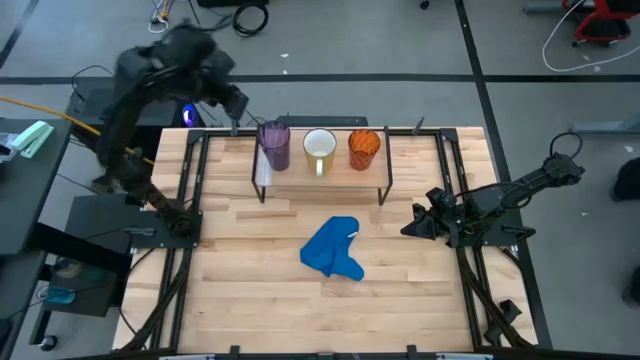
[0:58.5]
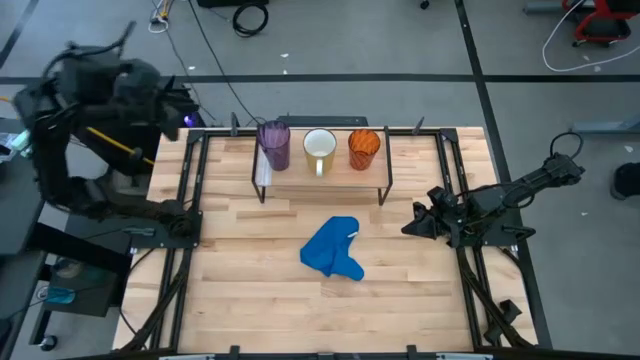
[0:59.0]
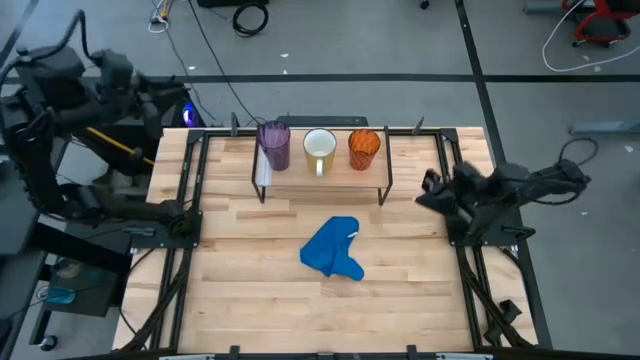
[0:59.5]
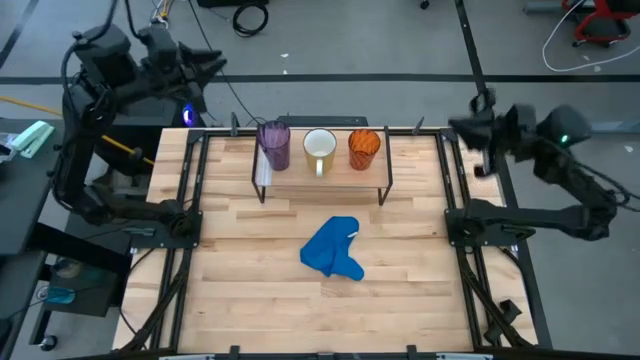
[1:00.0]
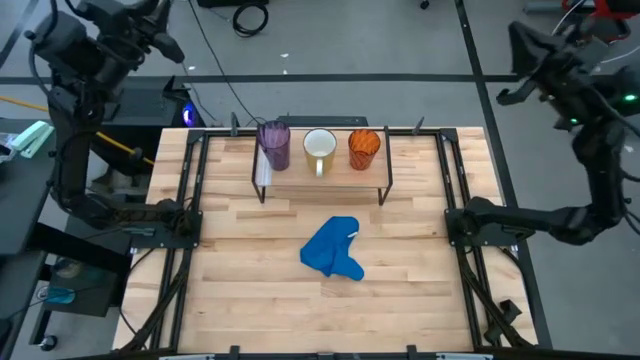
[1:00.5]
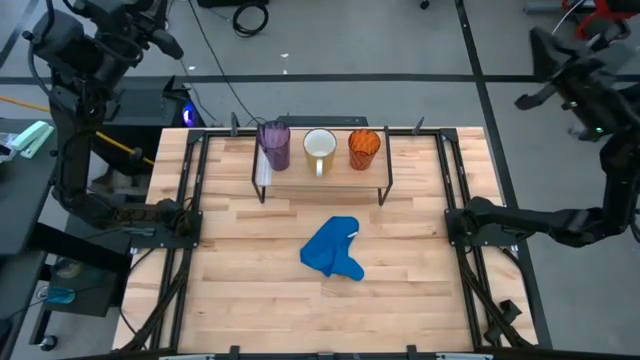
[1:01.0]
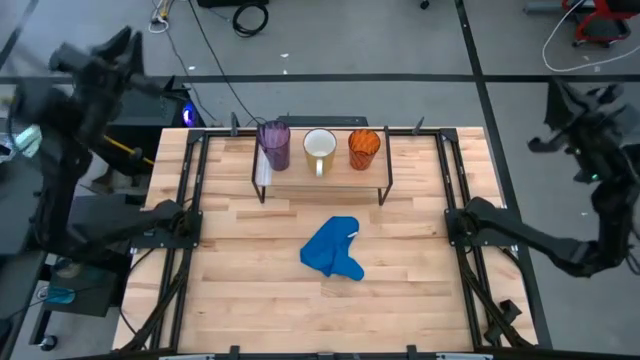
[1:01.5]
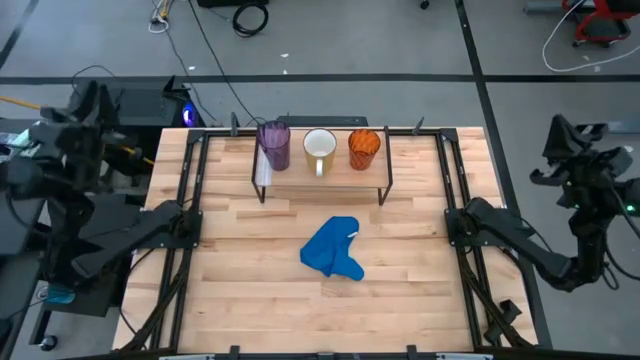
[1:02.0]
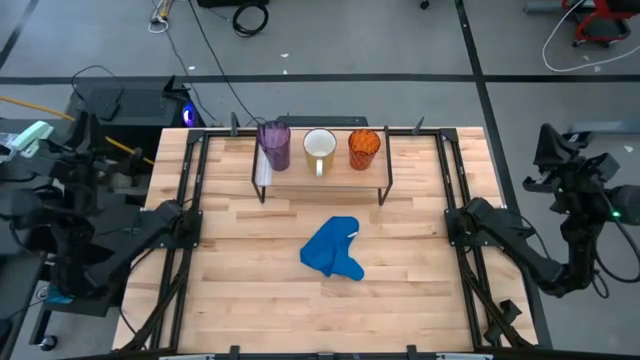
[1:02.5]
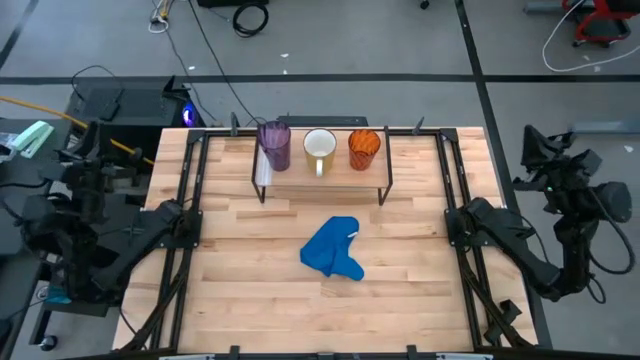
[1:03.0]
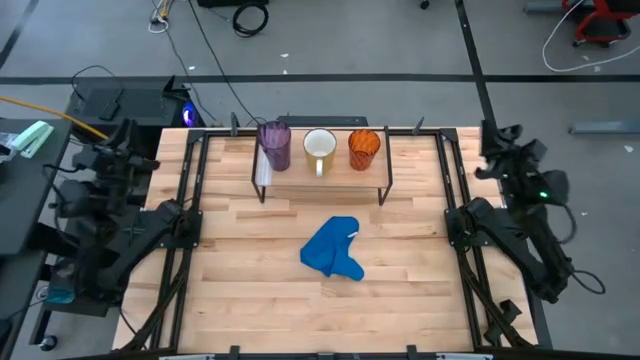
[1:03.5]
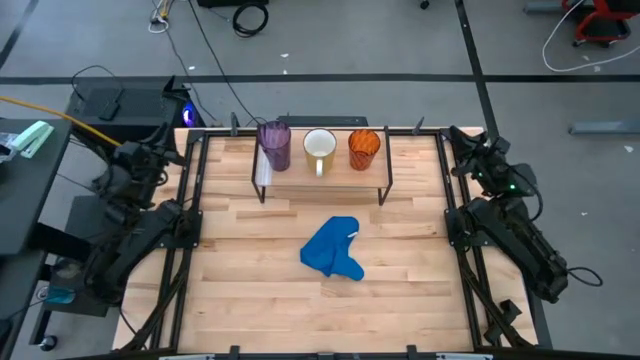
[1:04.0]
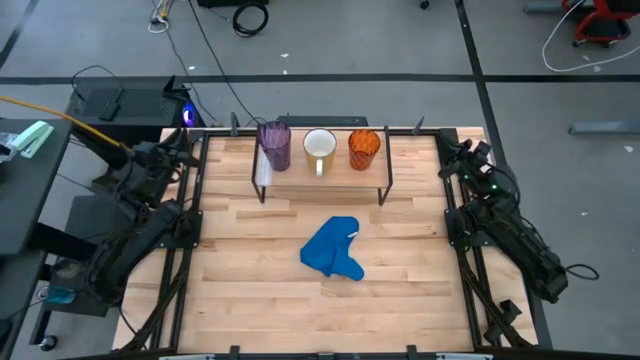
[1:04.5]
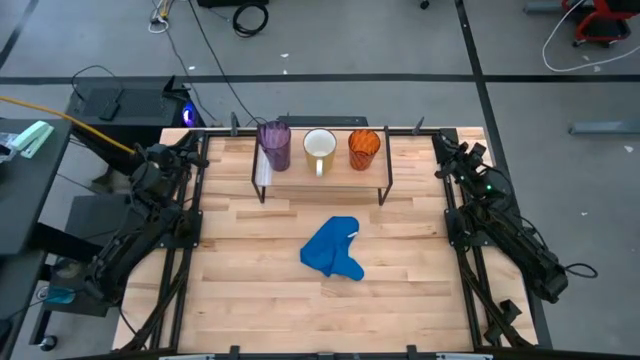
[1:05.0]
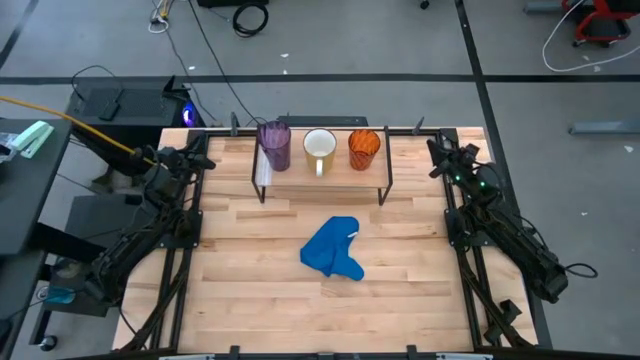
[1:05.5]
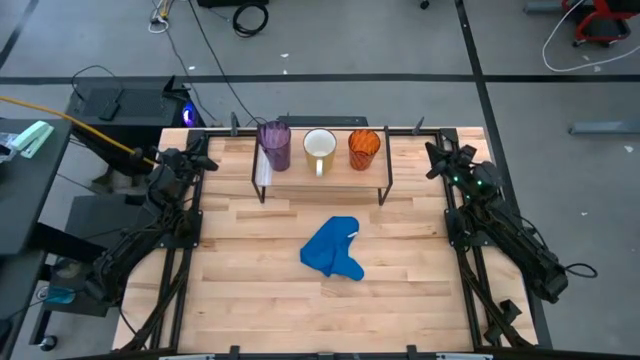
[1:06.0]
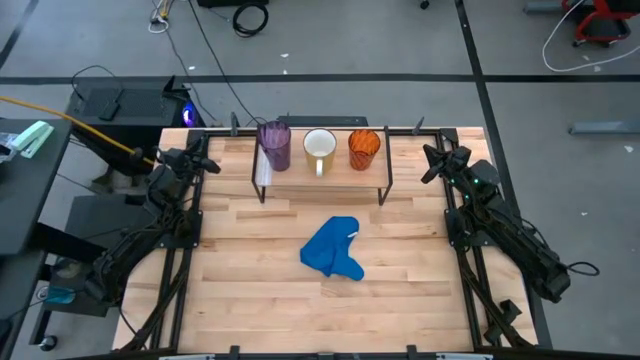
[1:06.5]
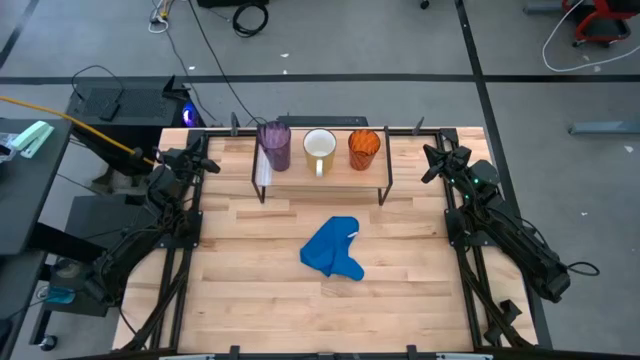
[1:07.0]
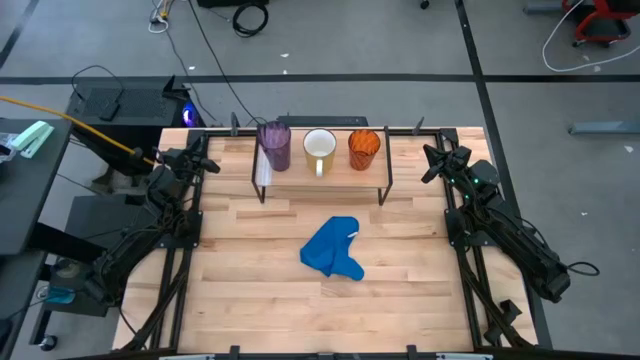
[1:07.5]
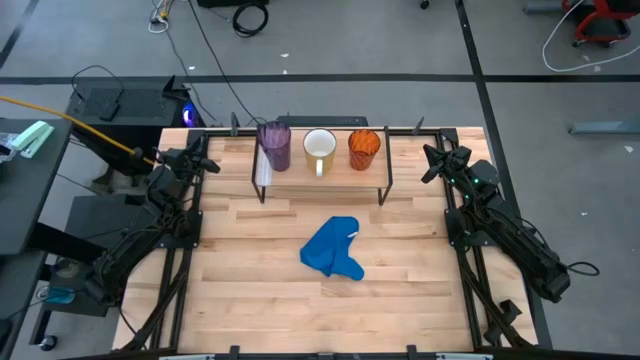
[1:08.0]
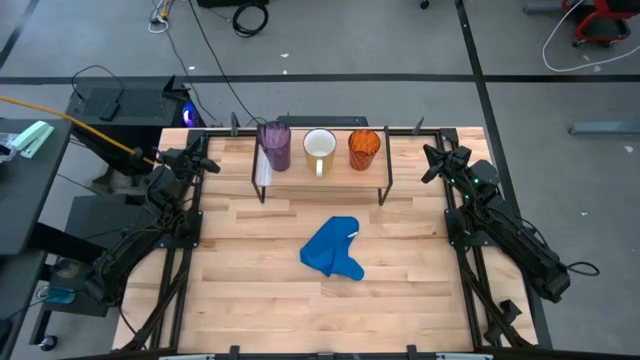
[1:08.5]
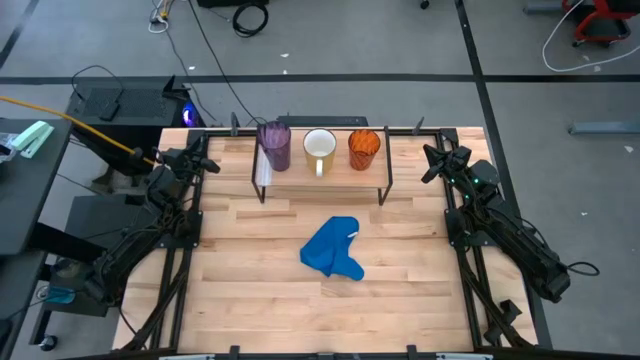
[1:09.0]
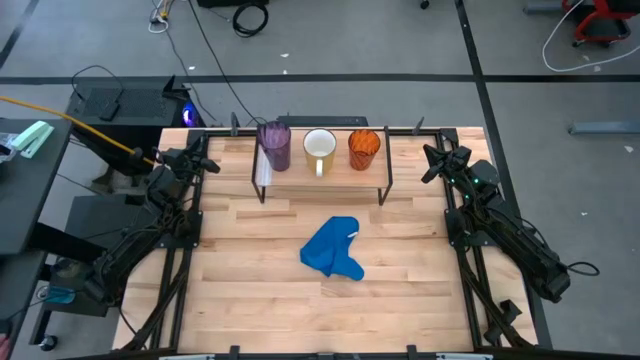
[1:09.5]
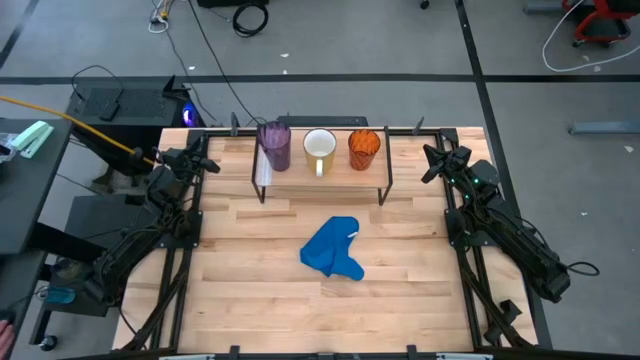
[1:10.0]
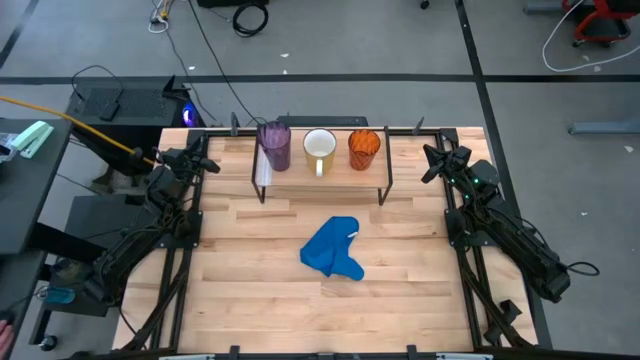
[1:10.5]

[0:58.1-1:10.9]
Task: Stack small to large cups/mugs on shelf
Return to Home Position
